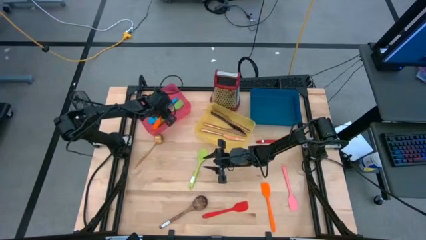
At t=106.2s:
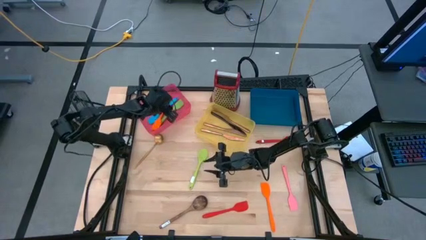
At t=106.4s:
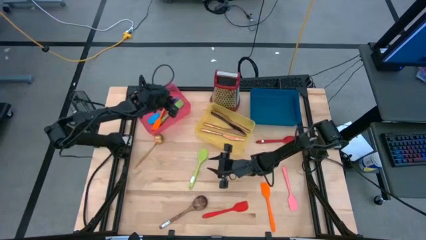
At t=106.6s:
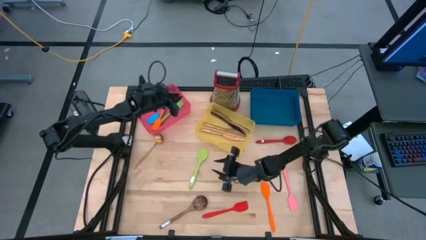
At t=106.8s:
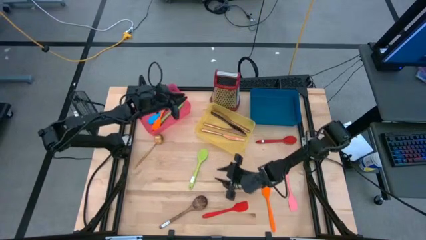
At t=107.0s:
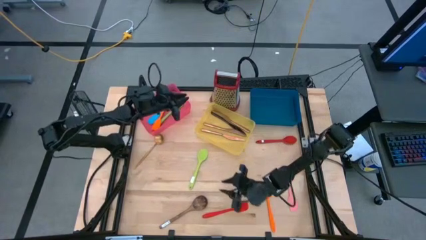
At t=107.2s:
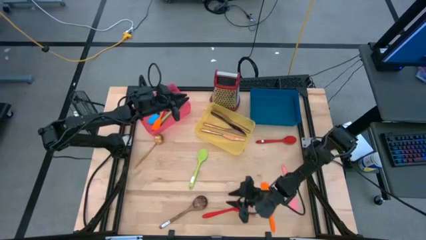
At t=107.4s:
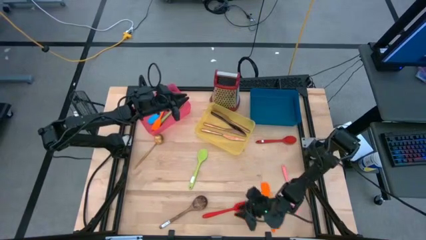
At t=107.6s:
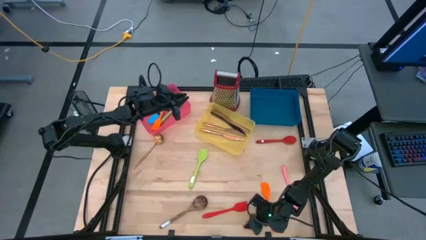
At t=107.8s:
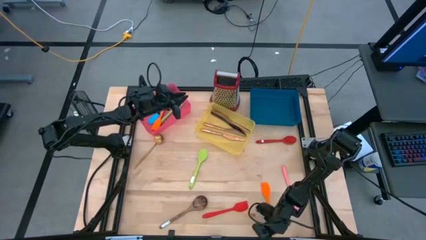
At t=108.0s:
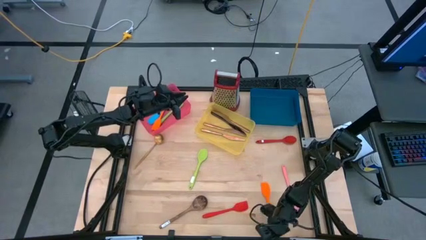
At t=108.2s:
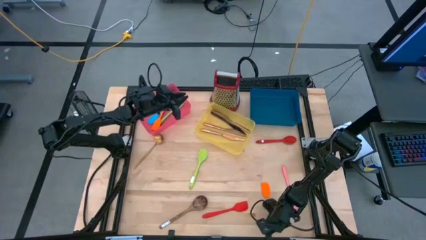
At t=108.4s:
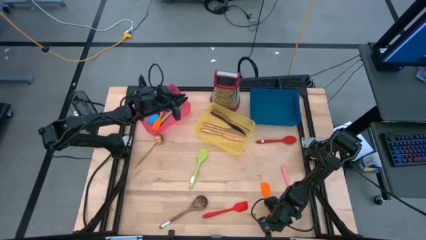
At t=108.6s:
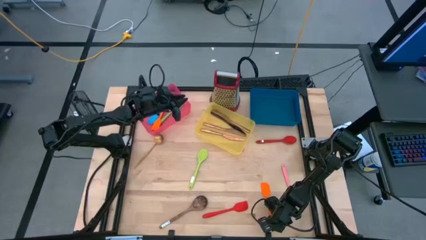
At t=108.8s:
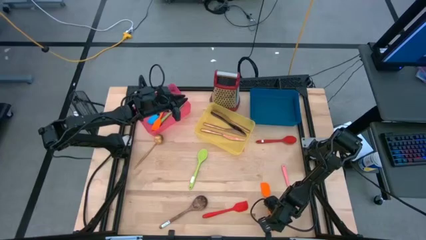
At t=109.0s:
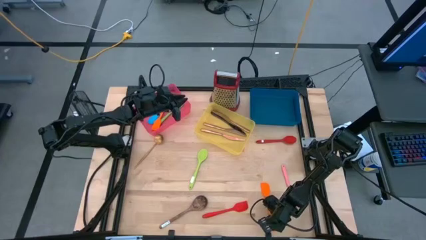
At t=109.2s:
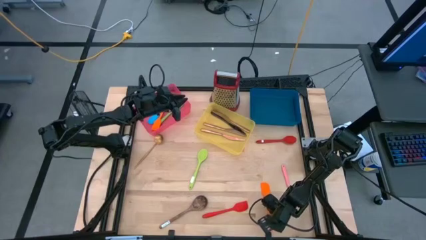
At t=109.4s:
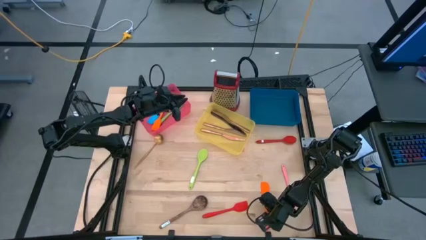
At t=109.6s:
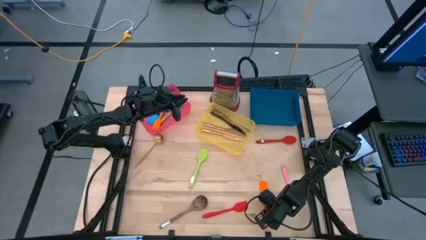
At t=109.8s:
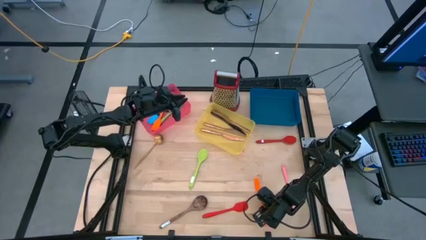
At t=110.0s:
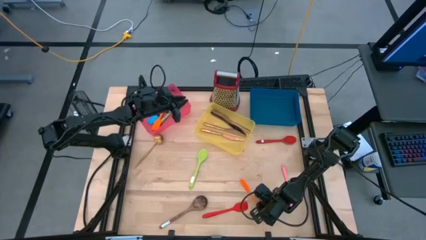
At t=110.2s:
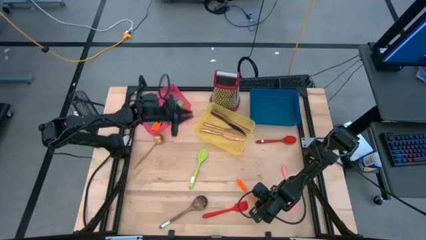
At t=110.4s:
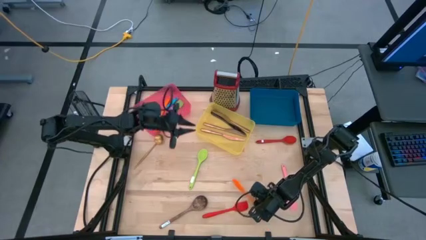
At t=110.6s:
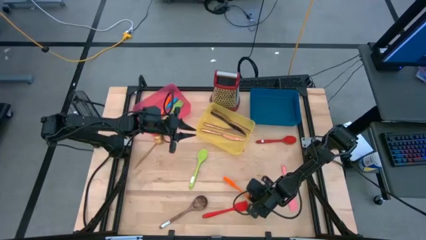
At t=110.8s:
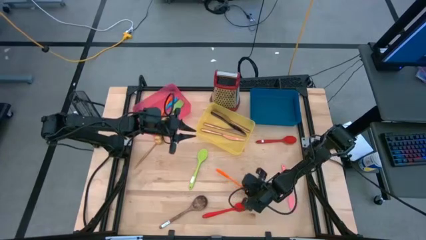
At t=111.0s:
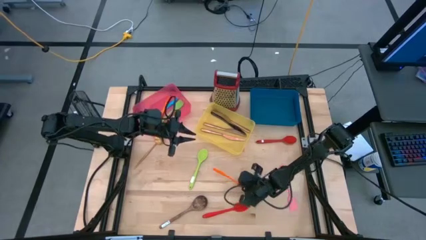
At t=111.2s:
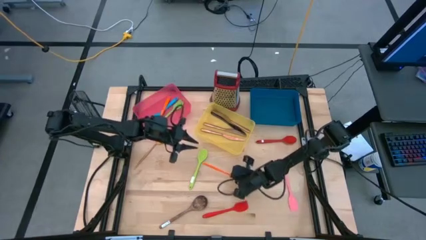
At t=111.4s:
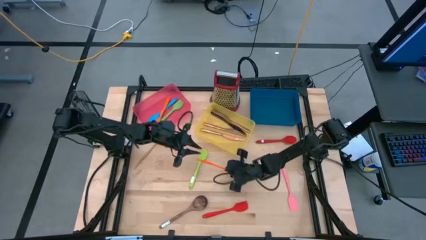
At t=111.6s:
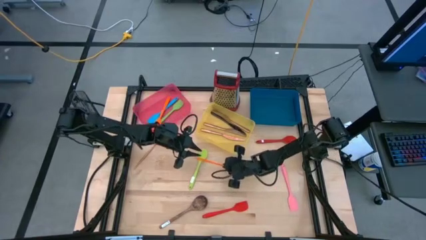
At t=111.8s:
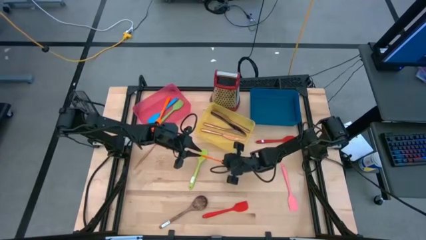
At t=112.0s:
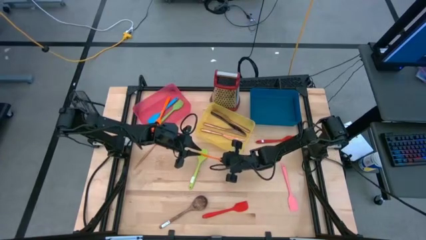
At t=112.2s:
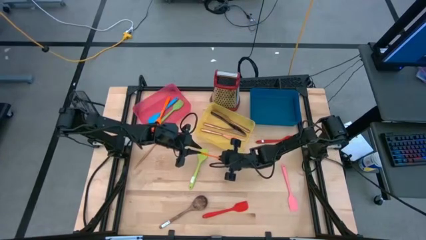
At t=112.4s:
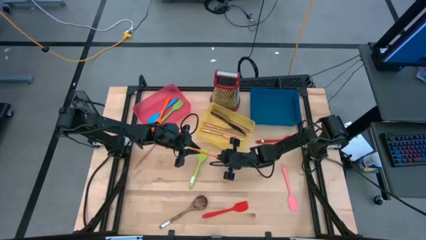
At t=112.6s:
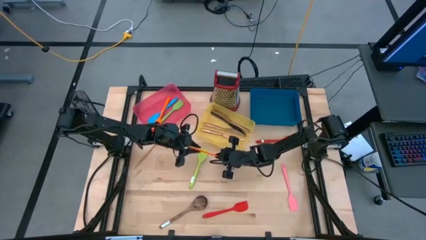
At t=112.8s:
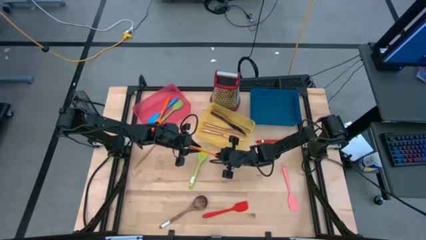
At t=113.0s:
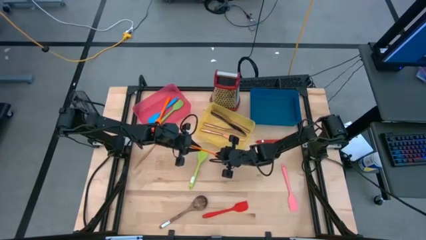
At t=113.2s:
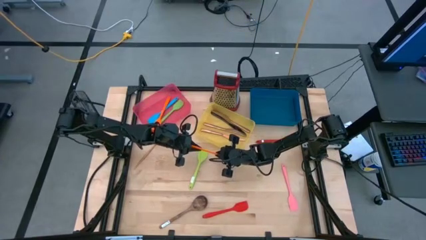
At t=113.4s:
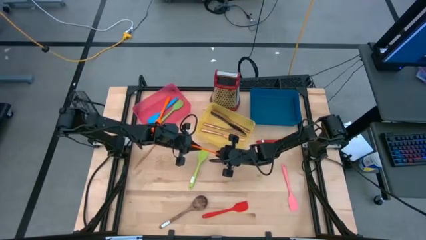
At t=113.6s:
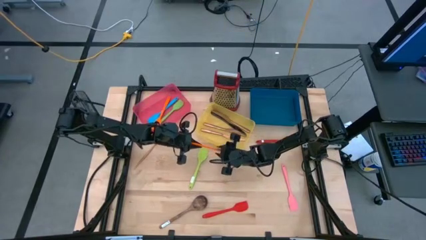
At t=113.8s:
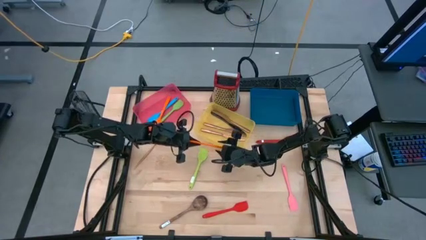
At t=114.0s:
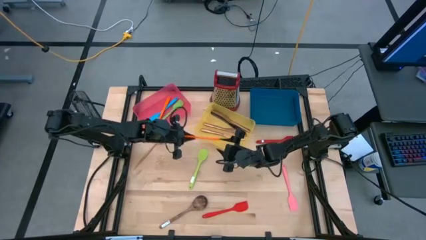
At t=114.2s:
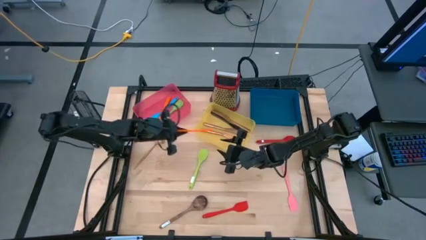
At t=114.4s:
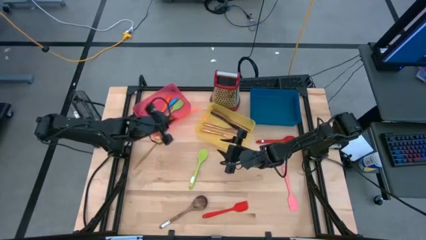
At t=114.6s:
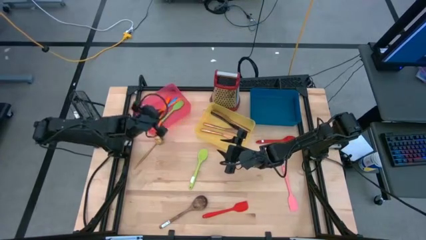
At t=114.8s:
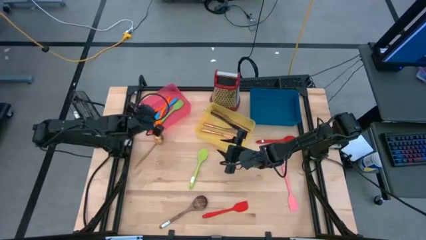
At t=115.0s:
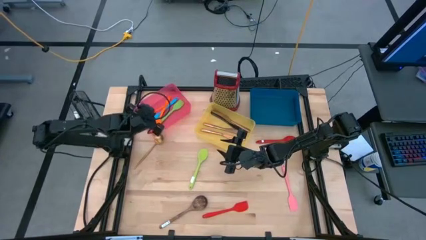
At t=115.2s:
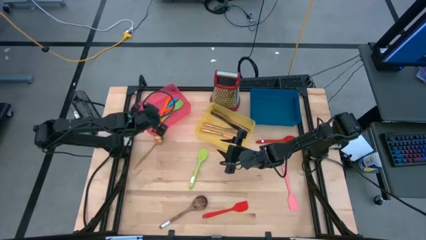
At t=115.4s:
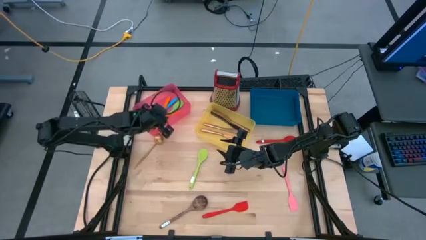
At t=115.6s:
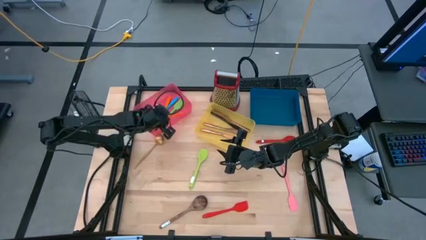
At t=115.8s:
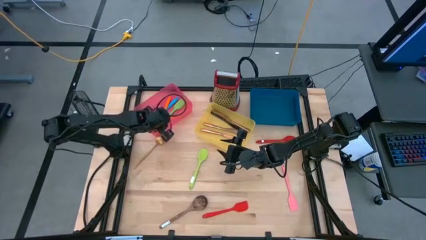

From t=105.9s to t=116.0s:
Task: Pick & Place Kitchen Items
Put the orange spatula into the red bin

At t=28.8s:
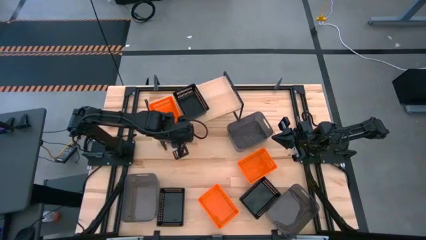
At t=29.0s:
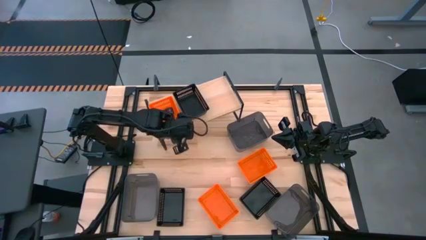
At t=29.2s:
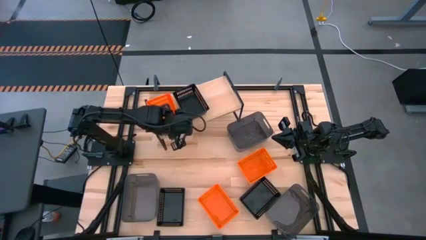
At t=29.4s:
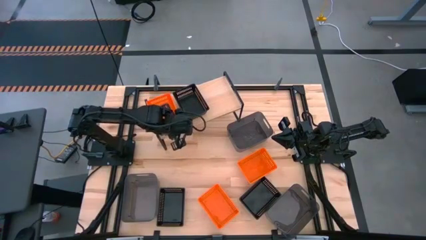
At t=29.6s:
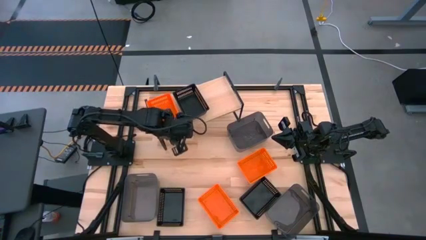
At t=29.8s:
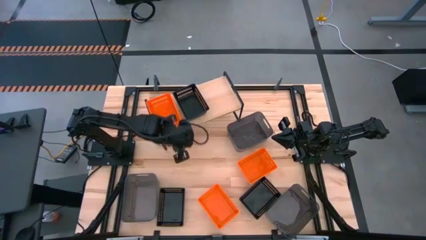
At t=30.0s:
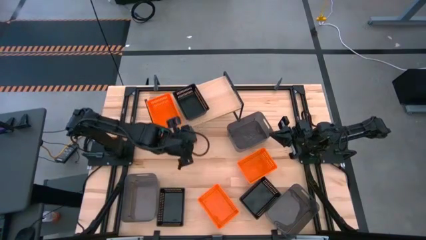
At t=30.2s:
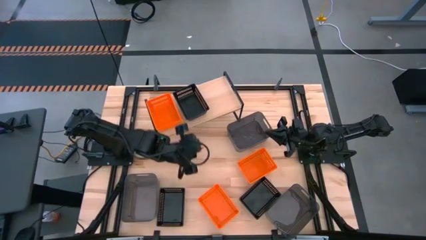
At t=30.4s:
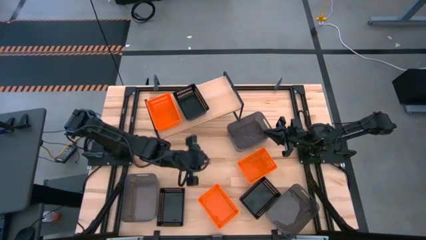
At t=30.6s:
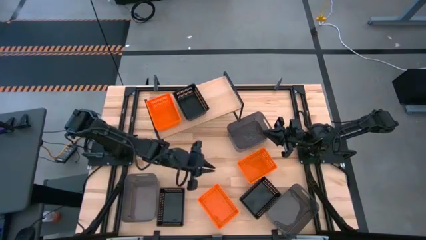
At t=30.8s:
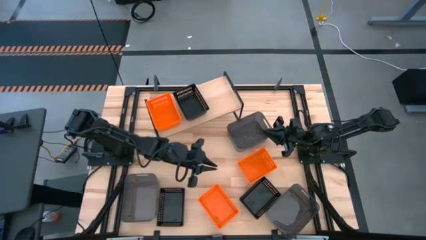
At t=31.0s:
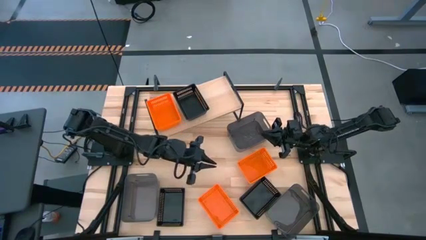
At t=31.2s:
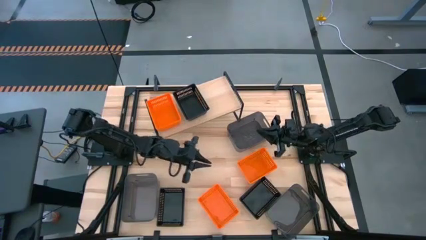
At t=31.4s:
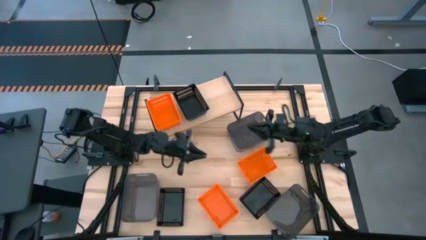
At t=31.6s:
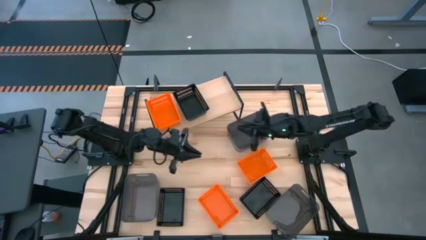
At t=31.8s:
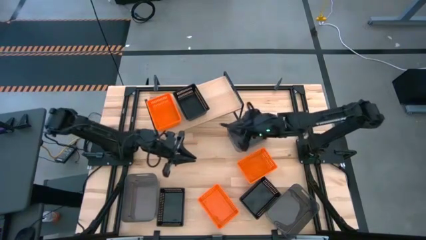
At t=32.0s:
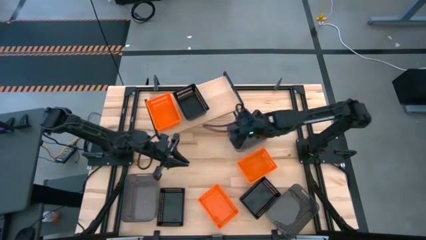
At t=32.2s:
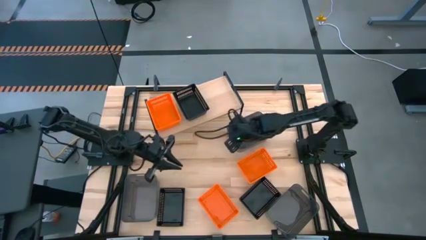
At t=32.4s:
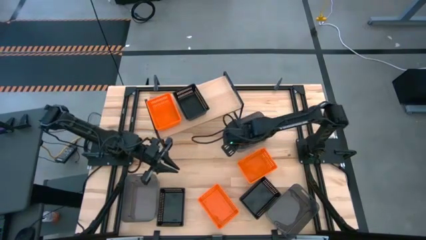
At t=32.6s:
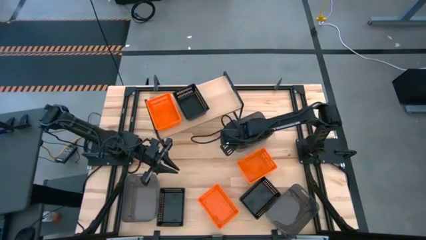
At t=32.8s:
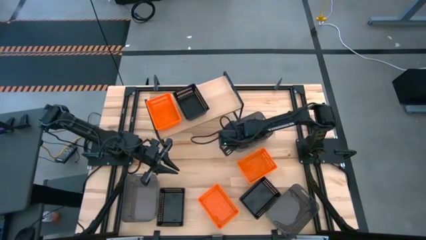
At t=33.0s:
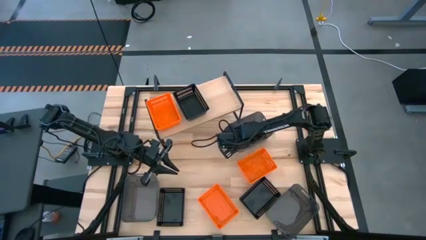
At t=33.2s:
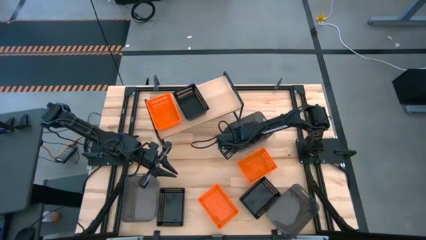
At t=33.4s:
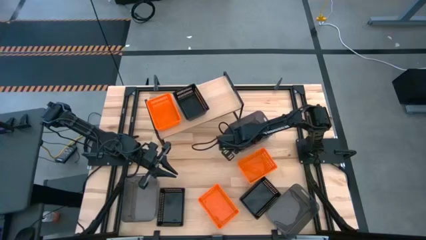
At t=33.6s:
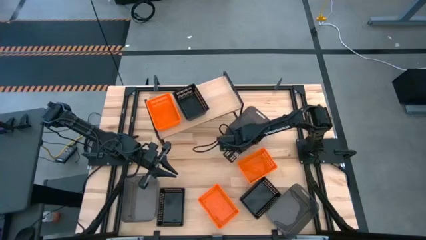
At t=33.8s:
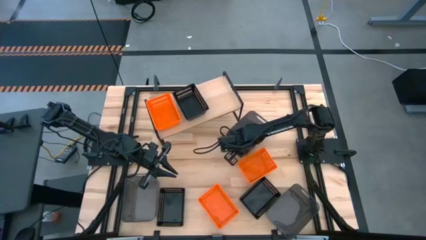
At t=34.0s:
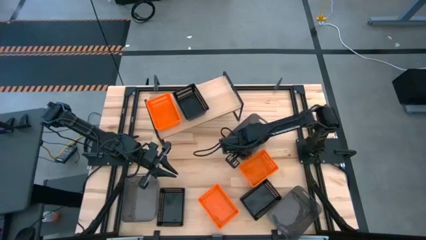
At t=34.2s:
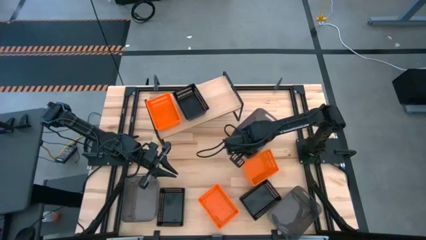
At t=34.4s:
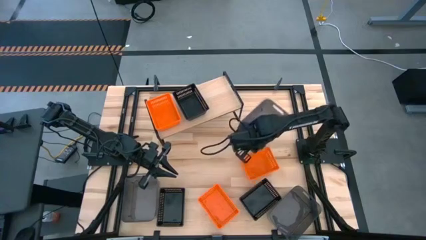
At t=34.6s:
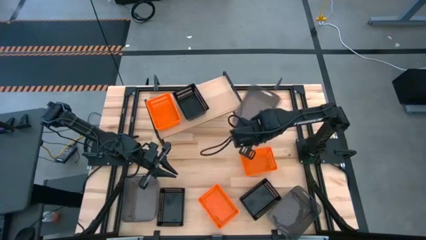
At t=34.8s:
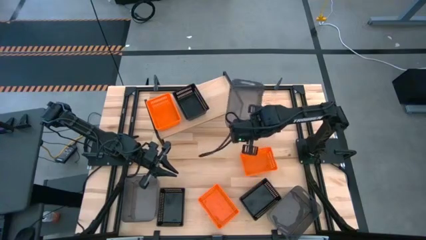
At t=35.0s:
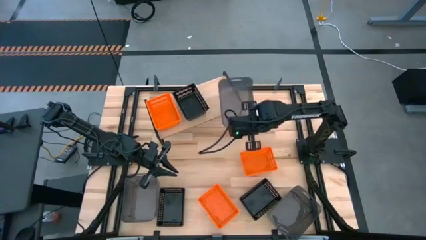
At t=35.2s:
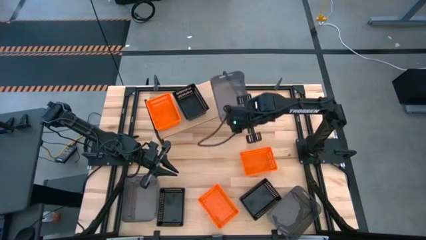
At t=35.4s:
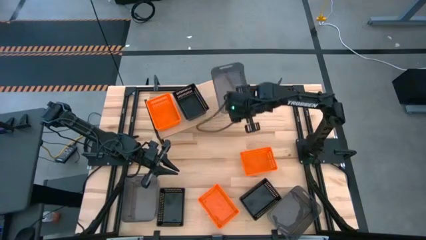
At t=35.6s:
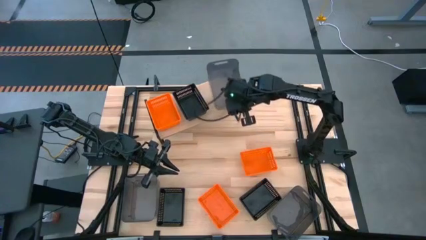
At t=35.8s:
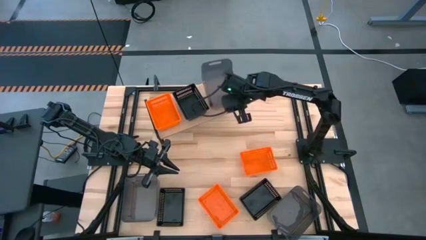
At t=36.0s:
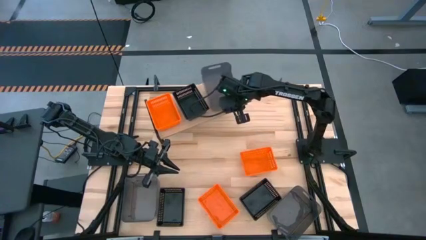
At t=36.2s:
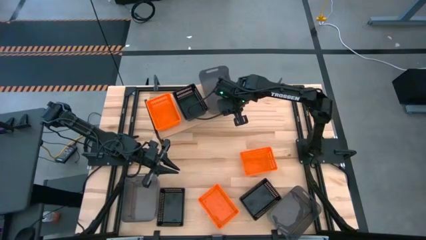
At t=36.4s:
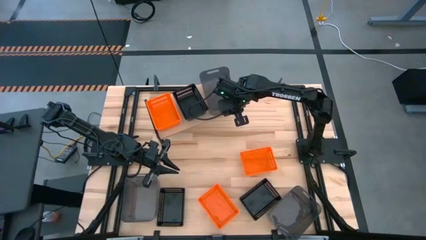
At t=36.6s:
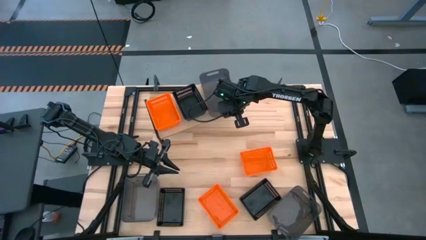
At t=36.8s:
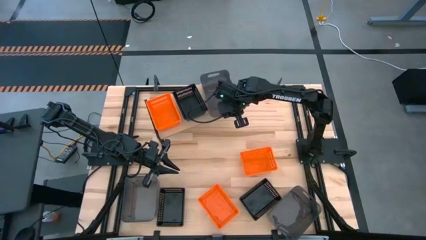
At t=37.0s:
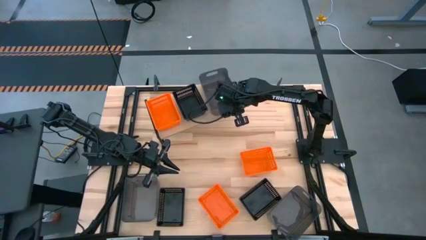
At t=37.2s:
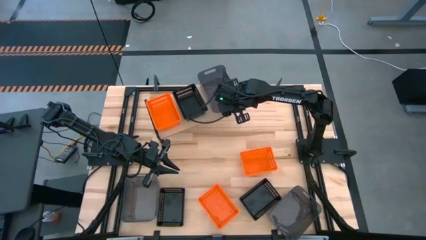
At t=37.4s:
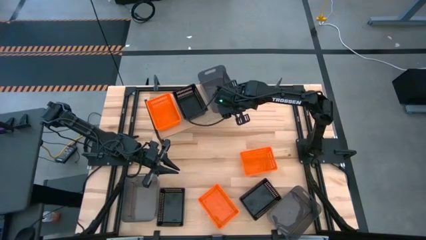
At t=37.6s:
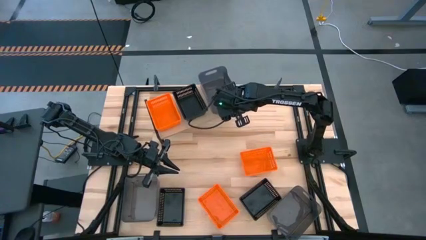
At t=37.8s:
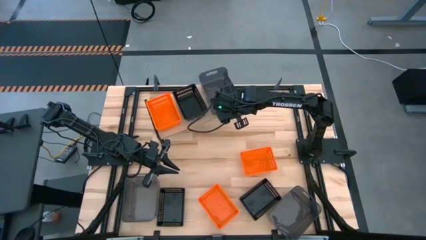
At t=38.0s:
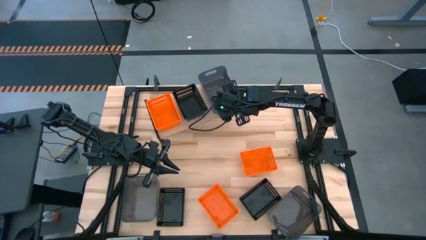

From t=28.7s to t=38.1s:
Task: Stack baskets on shelf by color
Put the top gray bin on the shelf
